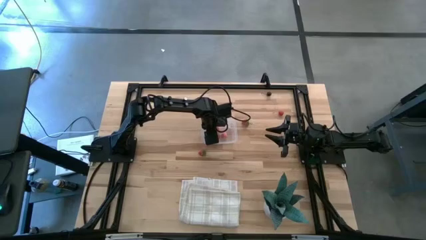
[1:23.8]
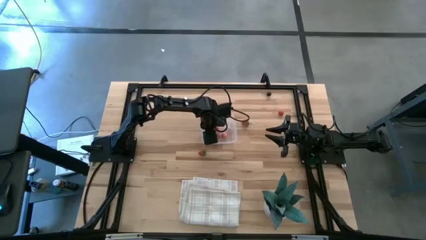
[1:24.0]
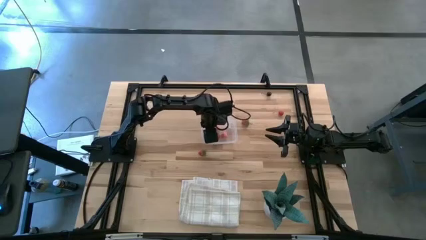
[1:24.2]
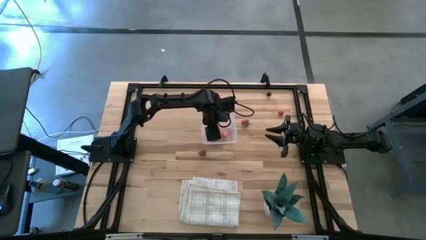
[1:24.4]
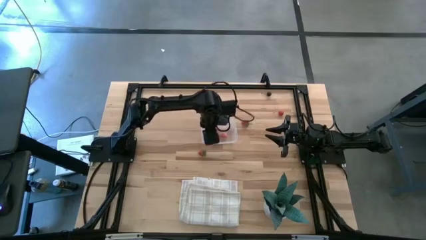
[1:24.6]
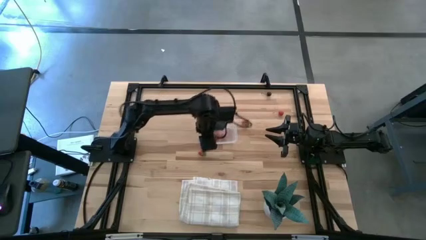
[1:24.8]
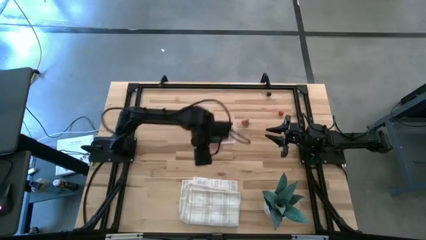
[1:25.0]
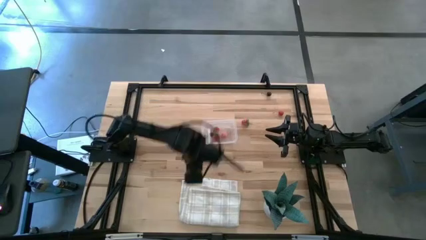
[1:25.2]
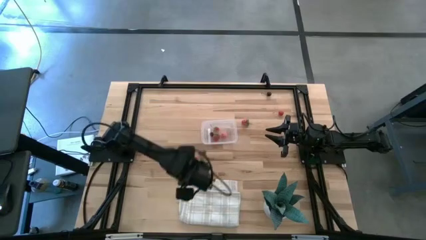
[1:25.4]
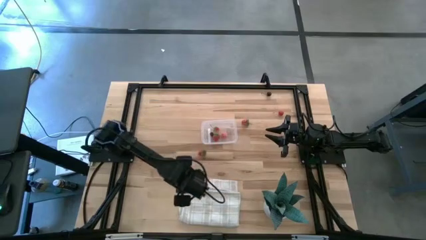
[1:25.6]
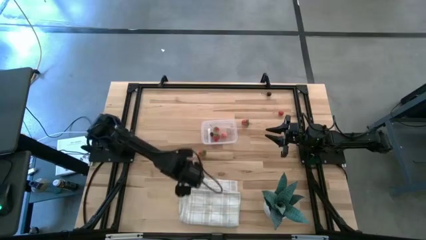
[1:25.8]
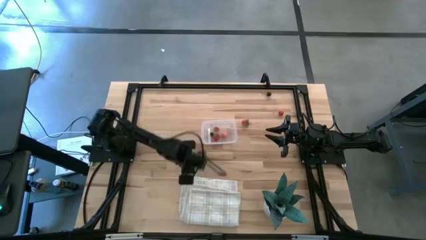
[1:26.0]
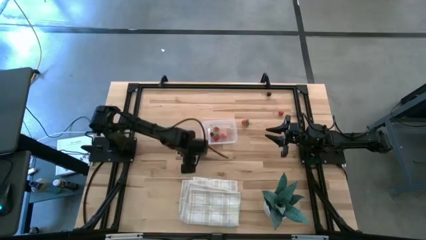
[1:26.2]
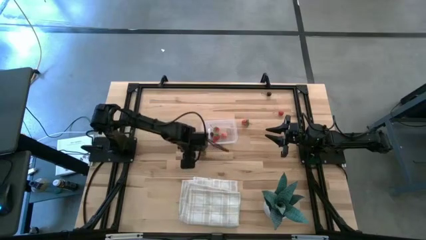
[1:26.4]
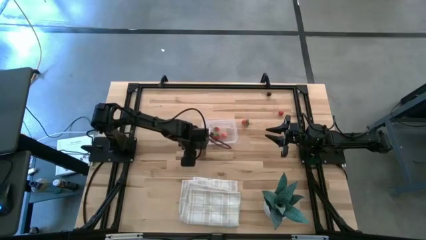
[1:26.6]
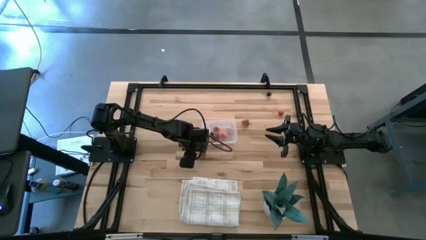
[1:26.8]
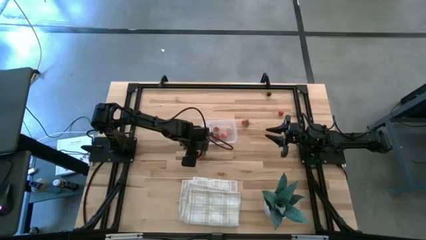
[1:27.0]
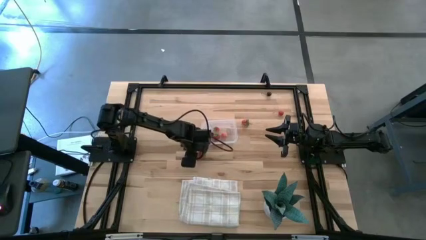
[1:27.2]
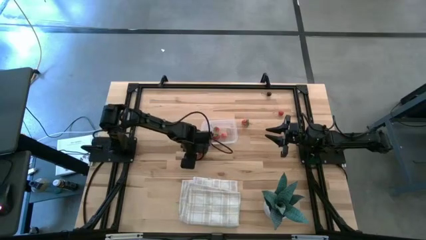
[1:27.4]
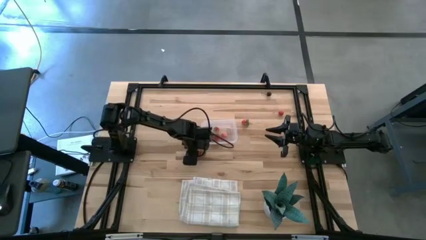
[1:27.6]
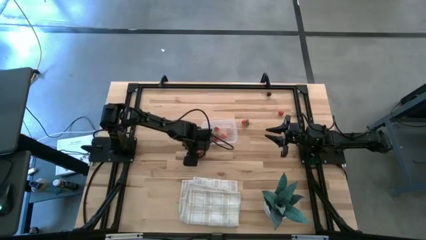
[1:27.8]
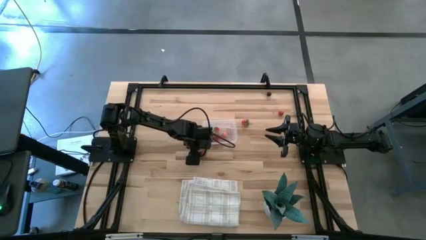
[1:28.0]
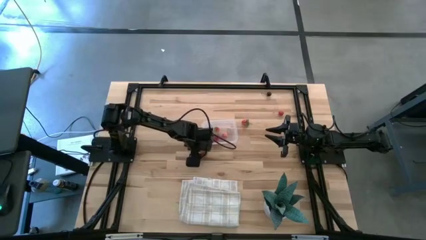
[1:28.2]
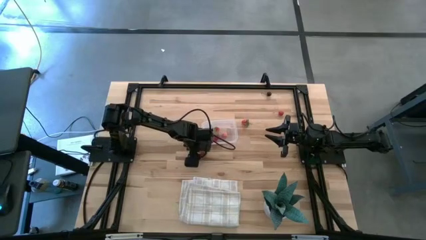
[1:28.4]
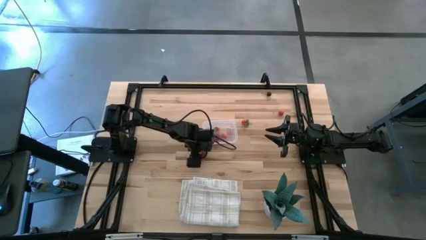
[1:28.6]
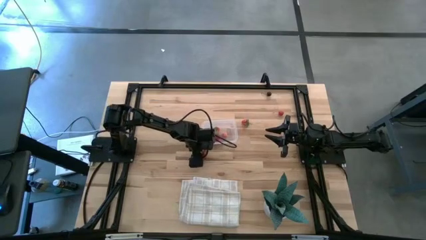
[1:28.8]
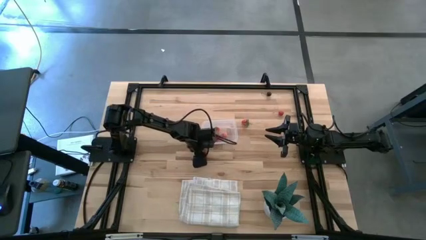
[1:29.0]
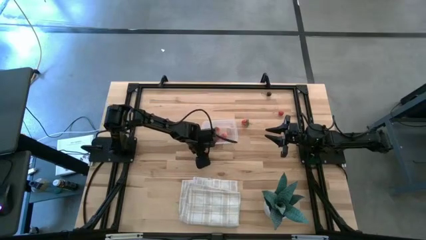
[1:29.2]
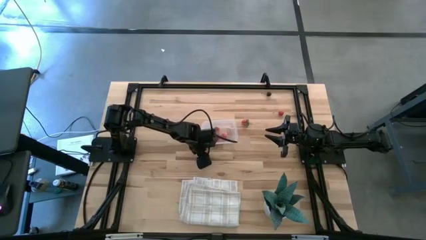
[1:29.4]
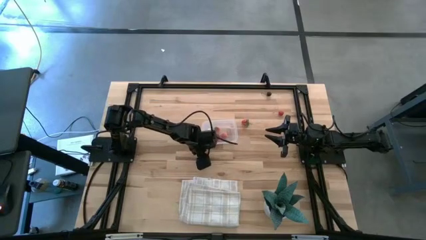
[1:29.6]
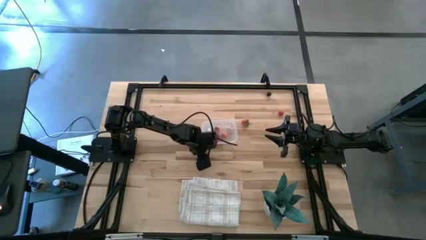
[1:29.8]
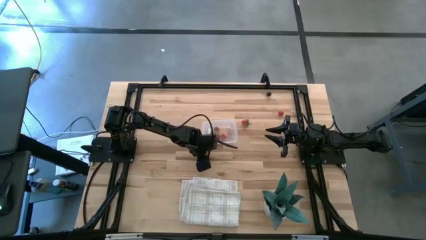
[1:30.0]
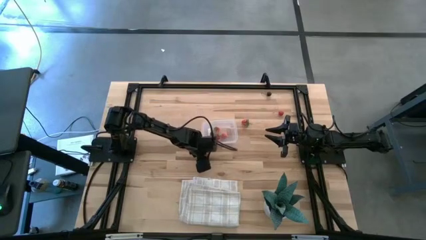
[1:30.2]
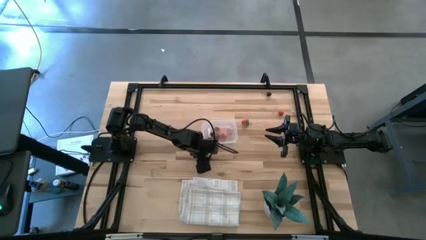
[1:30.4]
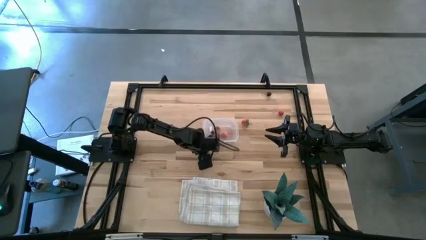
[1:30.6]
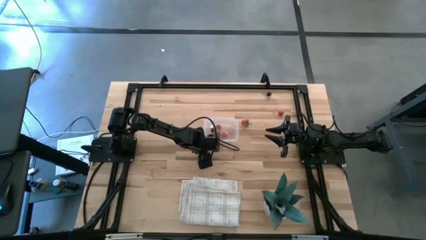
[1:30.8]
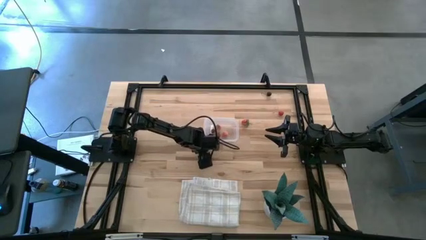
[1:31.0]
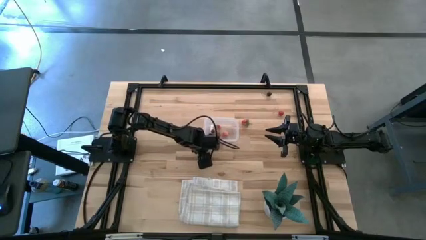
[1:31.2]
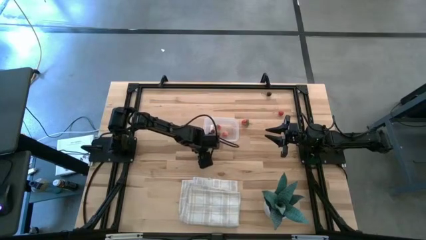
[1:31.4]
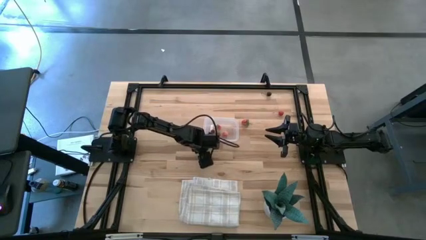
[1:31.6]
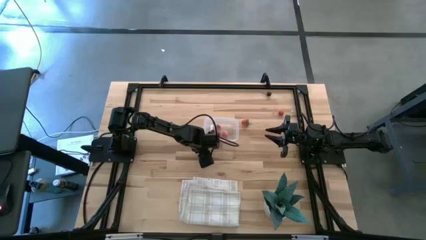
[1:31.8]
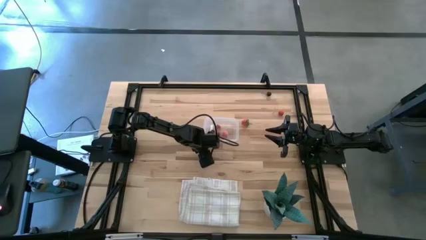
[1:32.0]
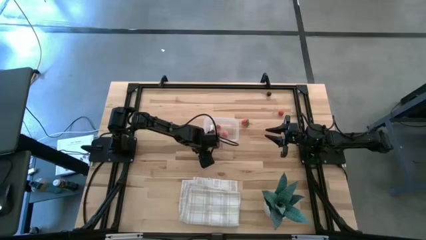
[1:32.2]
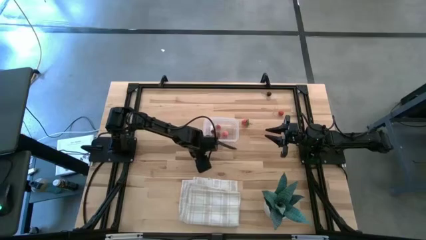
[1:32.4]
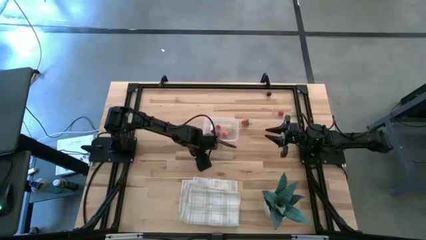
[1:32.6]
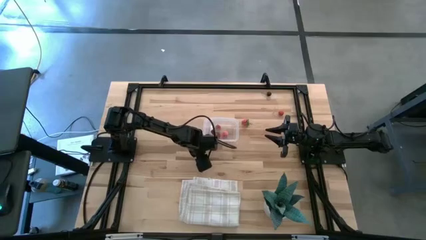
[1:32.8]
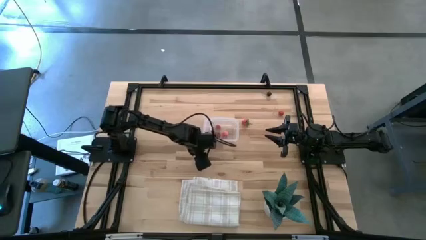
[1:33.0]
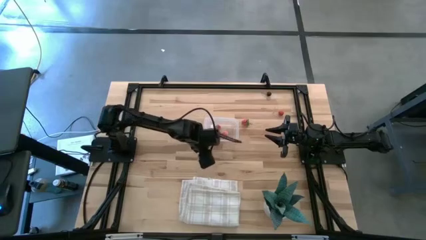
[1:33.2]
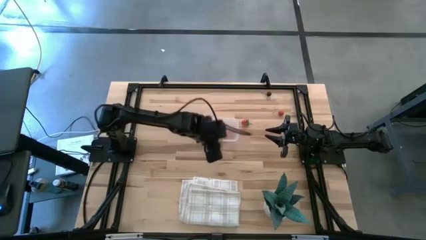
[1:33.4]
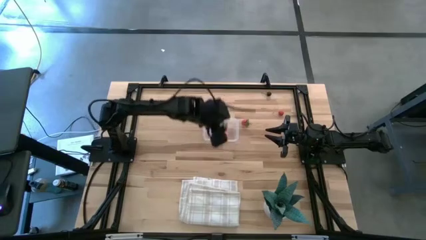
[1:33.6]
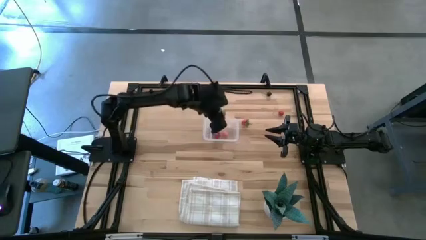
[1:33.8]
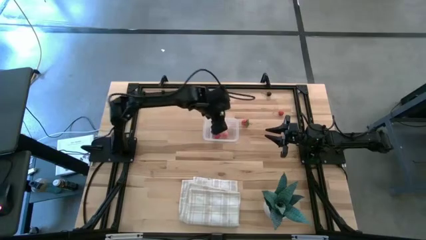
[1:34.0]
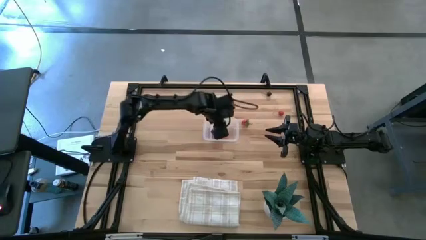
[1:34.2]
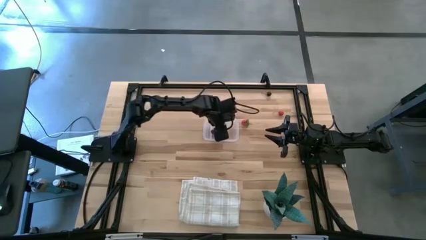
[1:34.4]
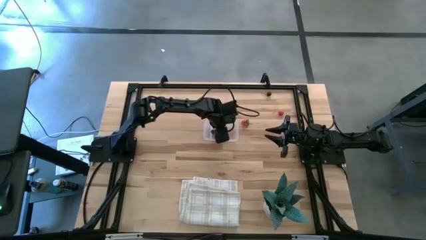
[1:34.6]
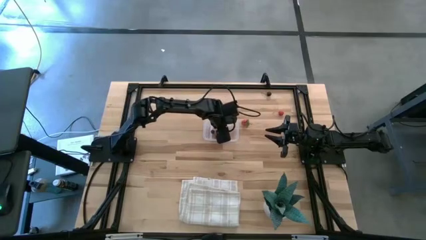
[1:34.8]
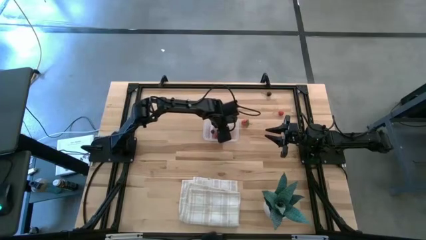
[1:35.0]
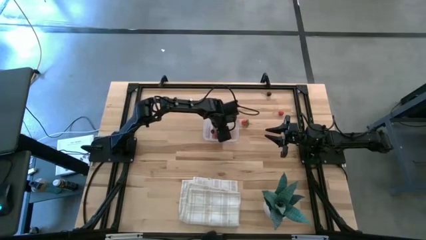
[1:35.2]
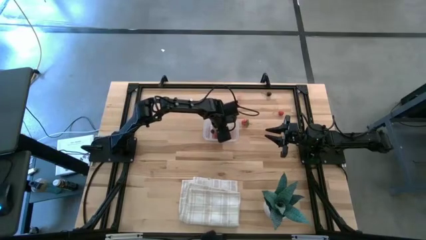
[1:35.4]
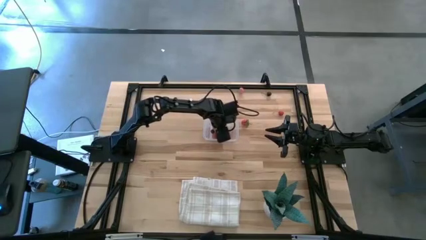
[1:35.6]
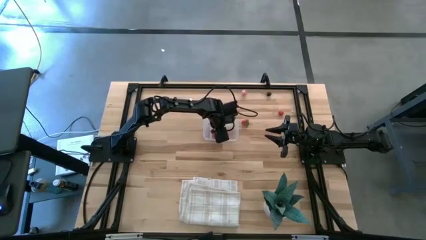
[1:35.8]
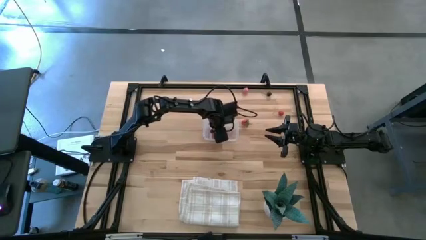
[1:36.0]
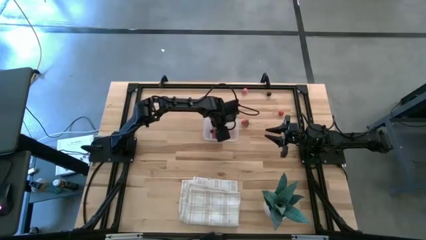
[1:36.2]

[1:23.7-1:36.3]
Task: Pick and placing Produce into tupperware
Put the bottom strawberry into the transparent bin
